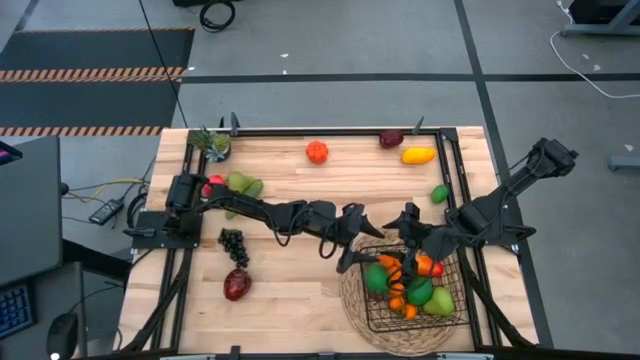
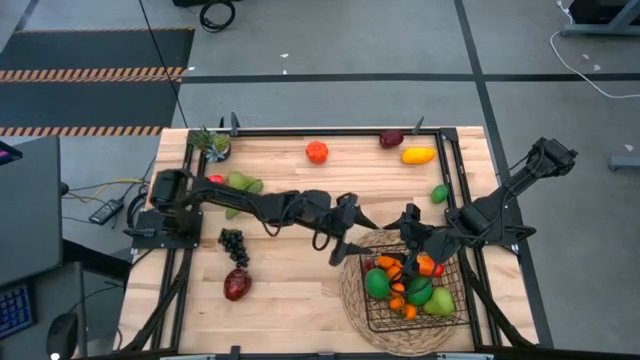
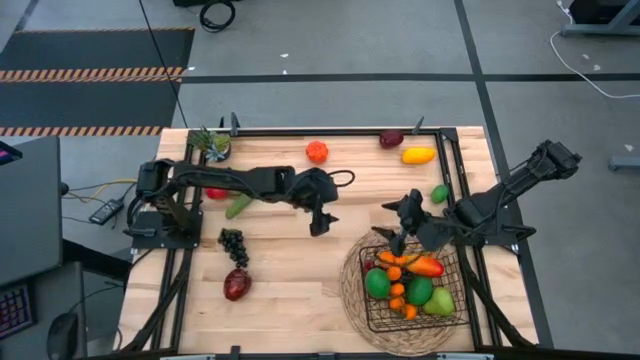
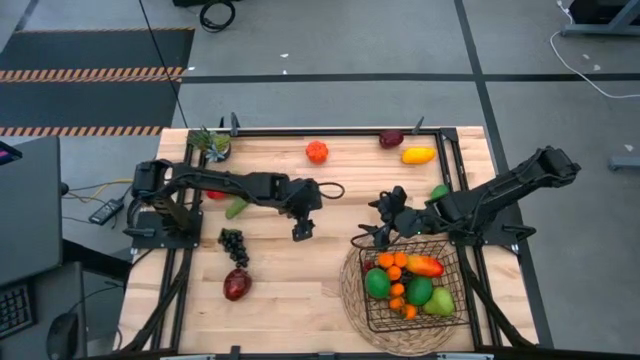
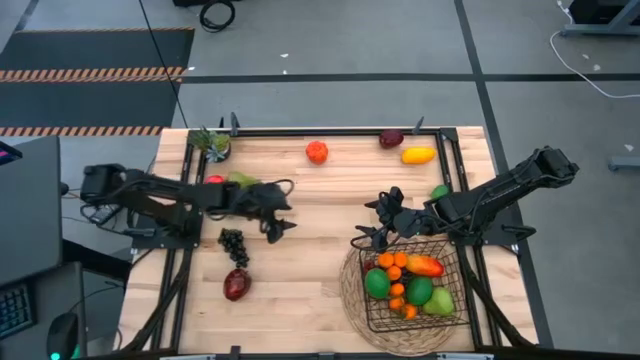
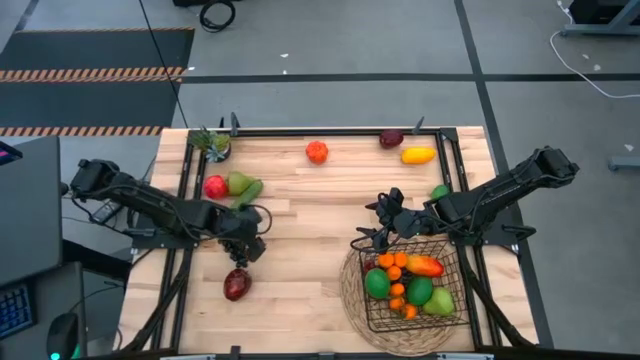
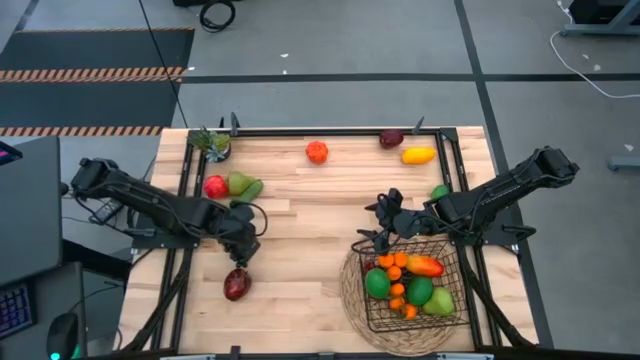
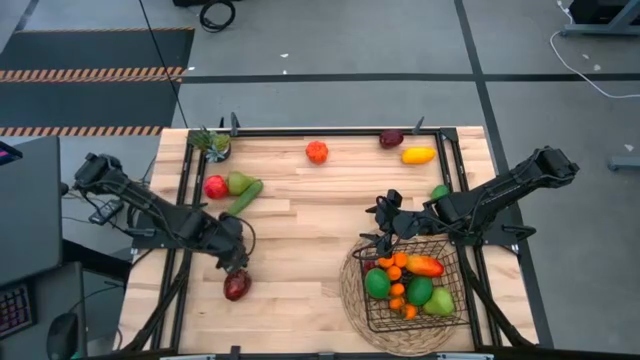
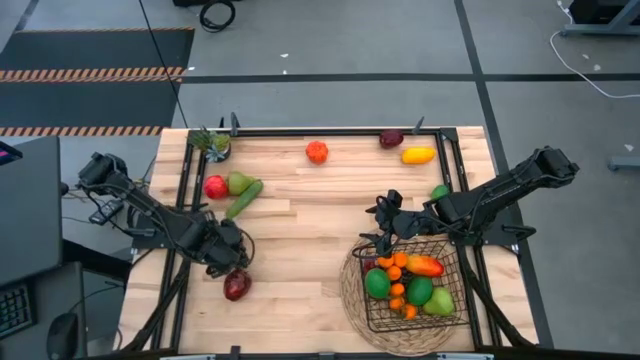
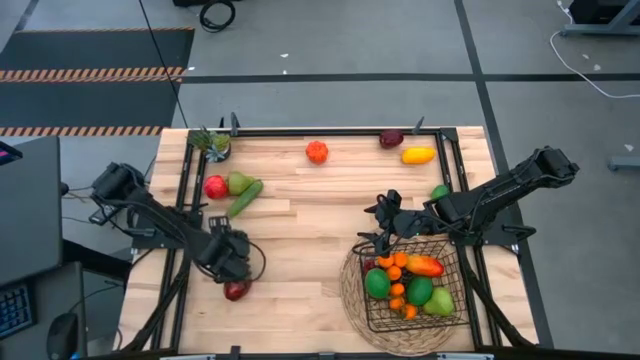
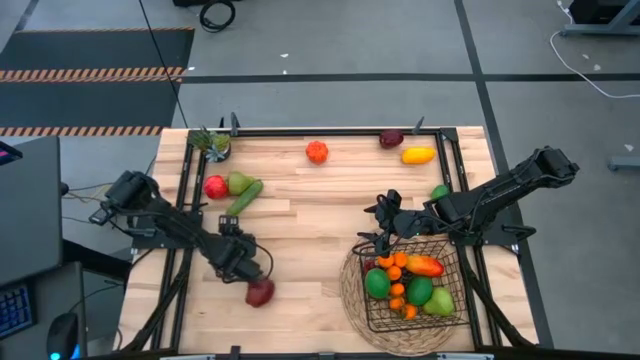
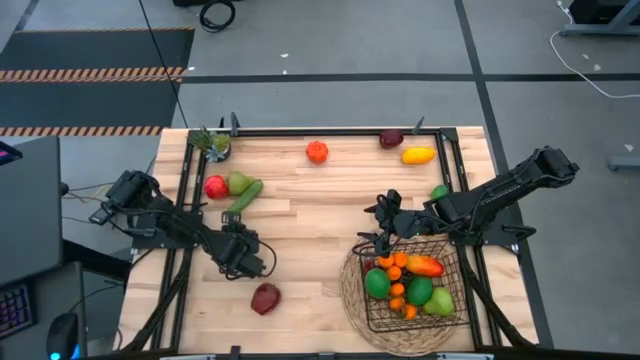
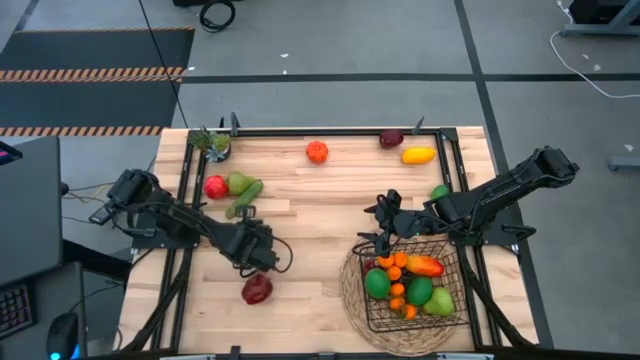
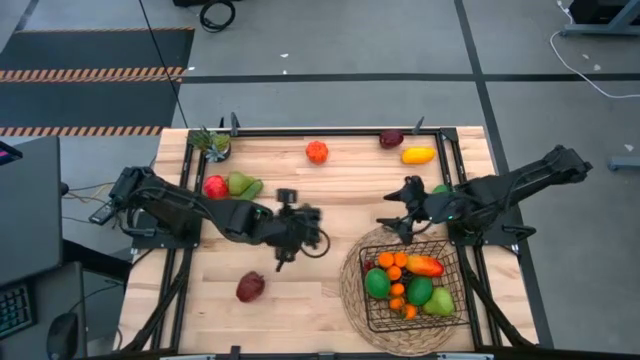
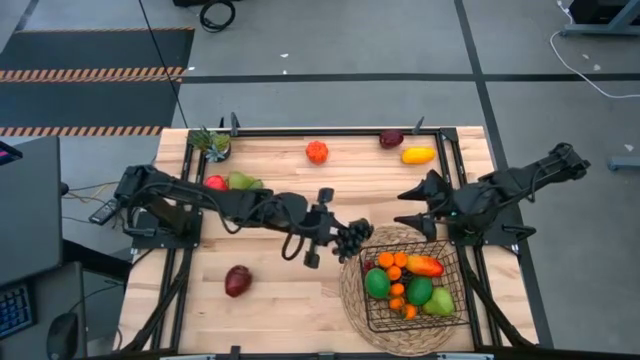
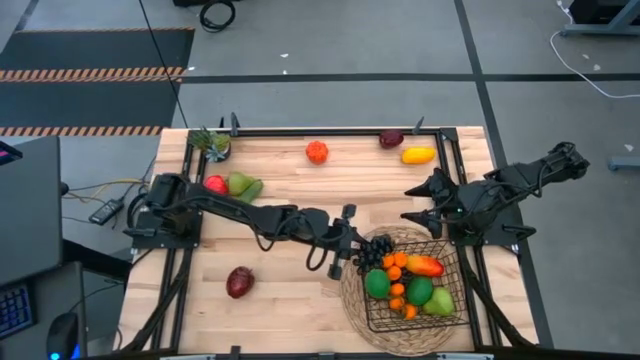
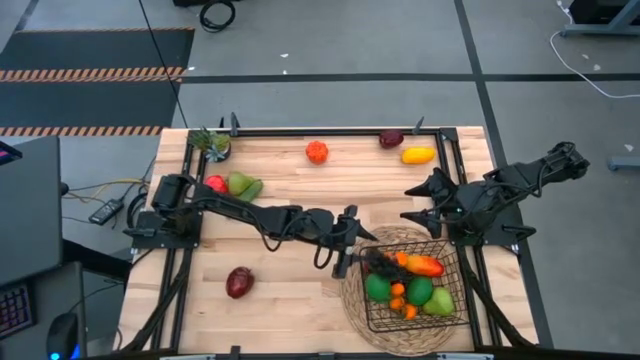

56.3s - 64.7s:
Task: Build produce basket
Put the black grapes into the black wire basket

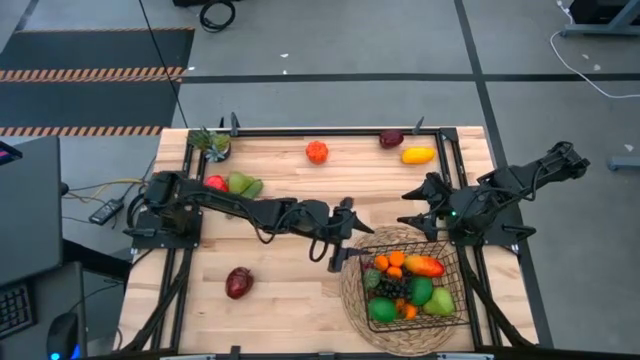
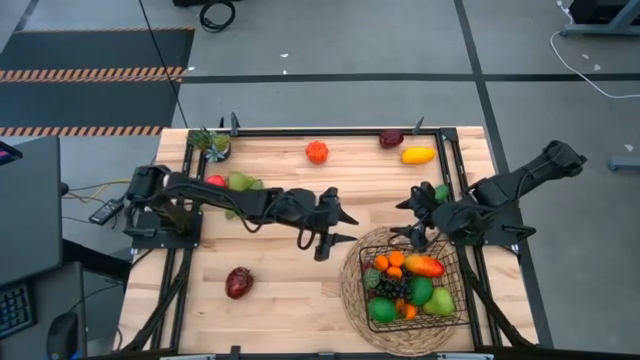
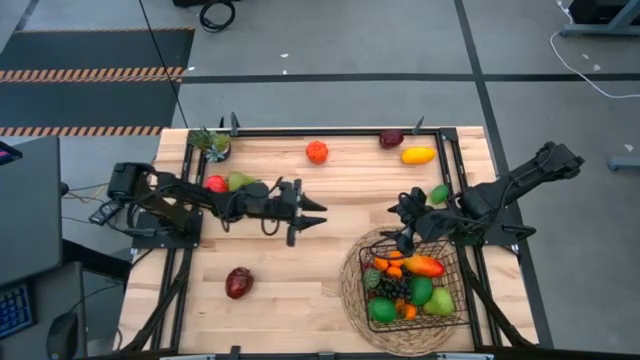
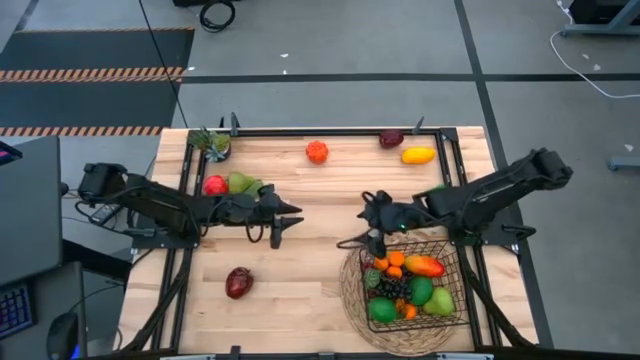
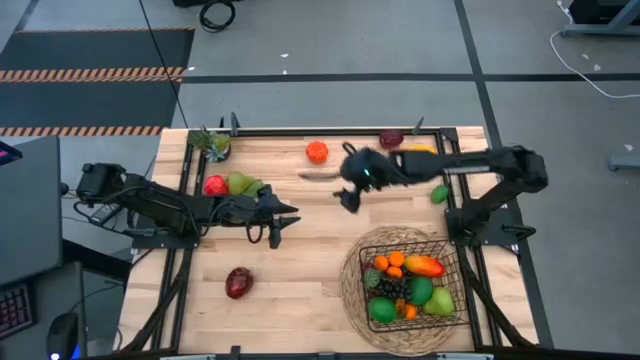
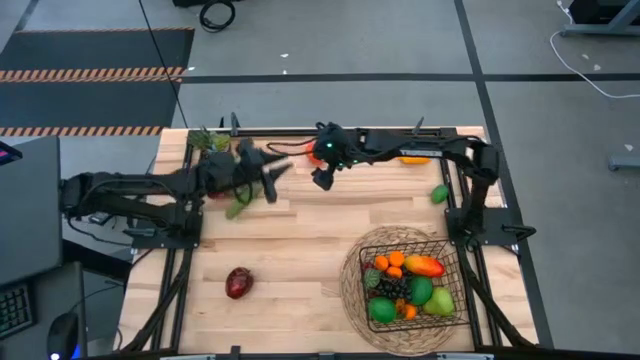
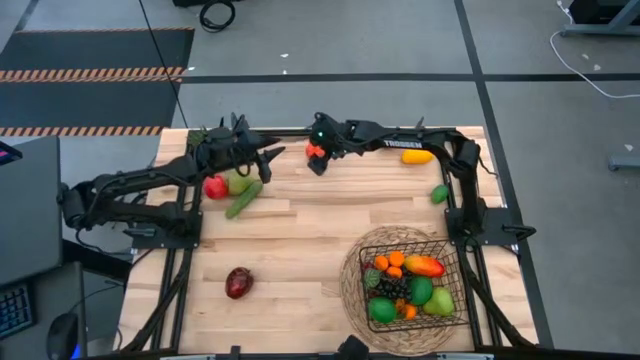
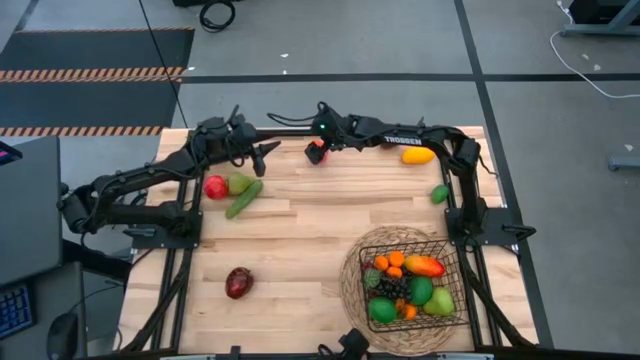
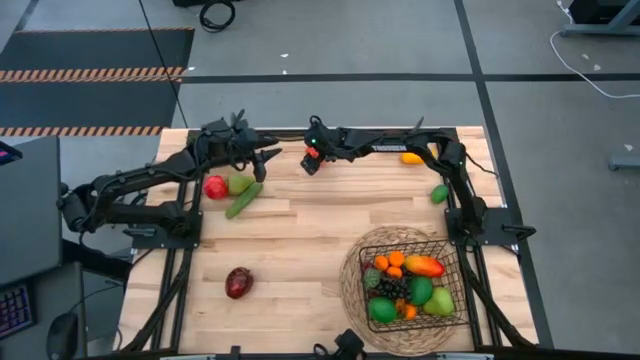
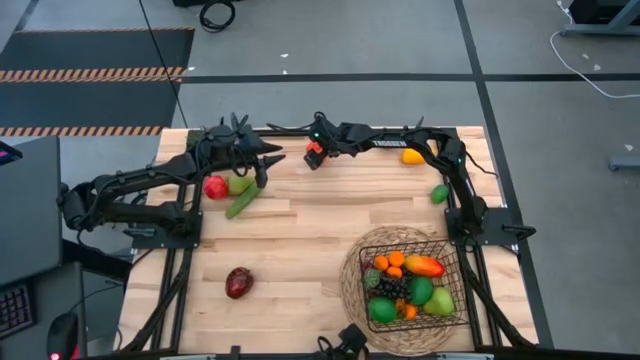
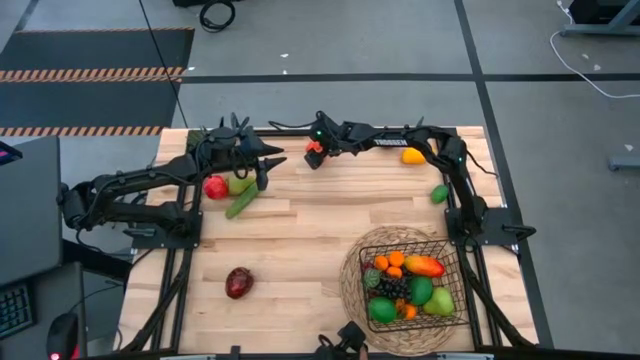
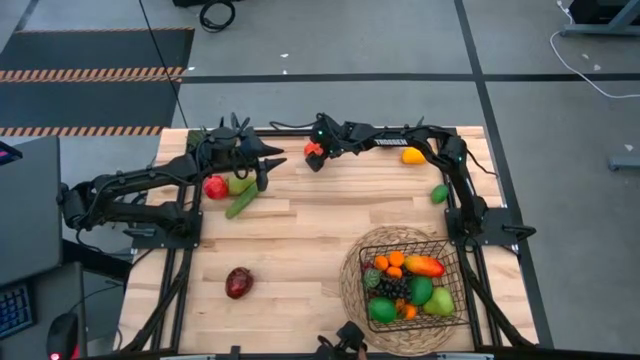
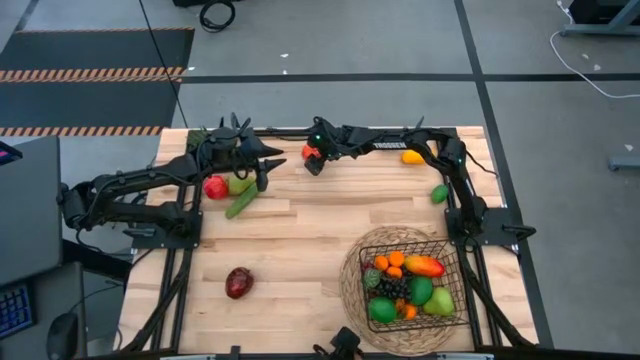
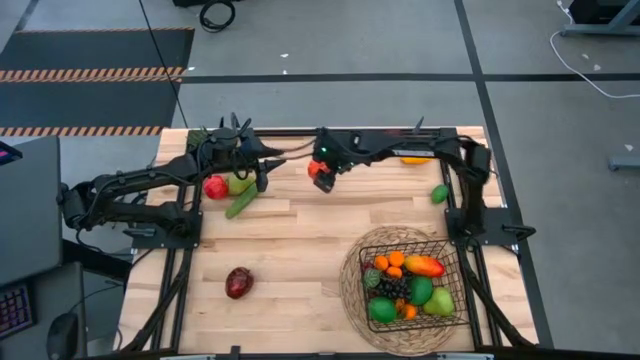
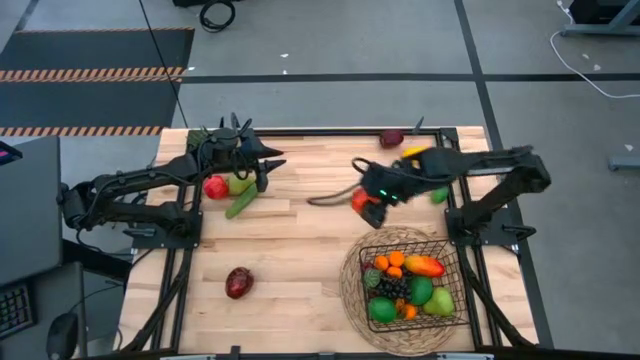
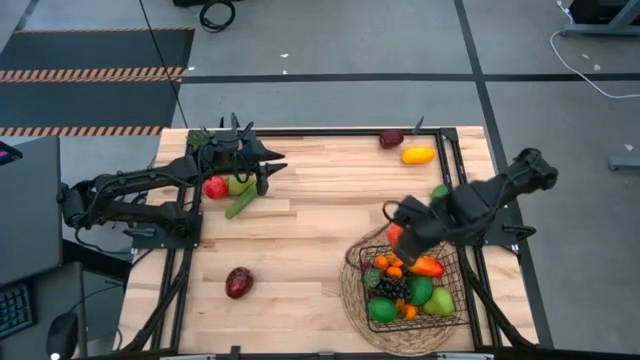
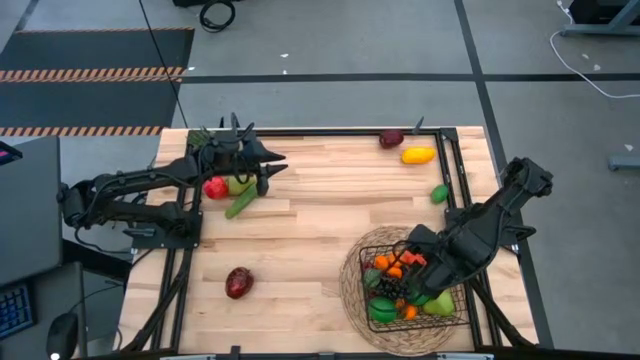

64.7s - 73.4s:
Put the orange pumpkin into the black wire basket

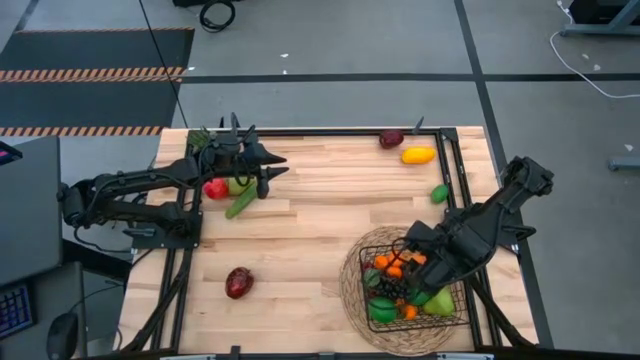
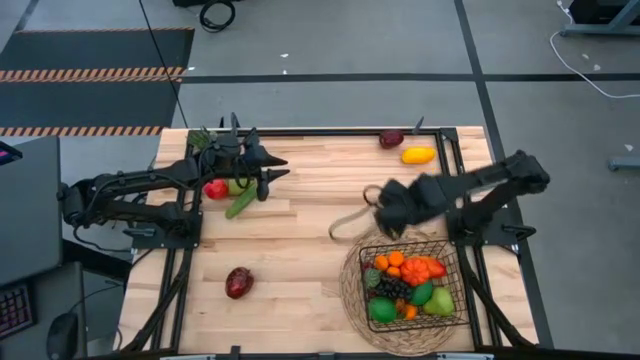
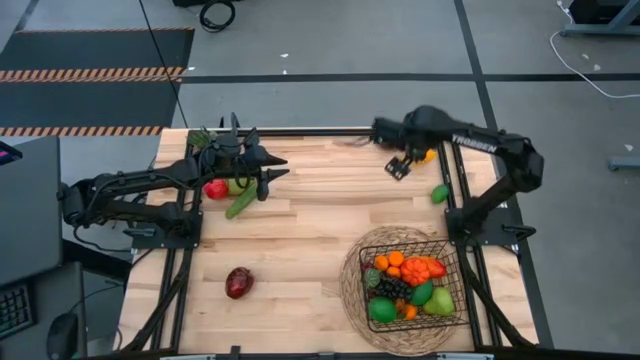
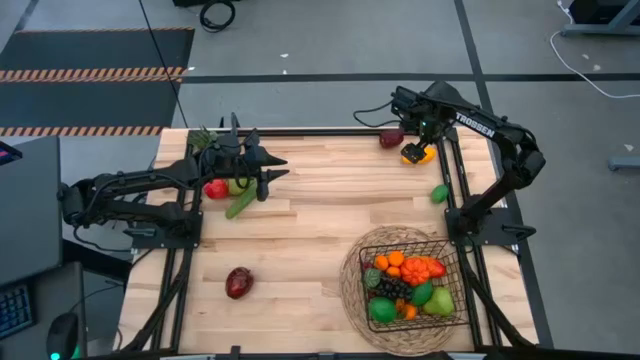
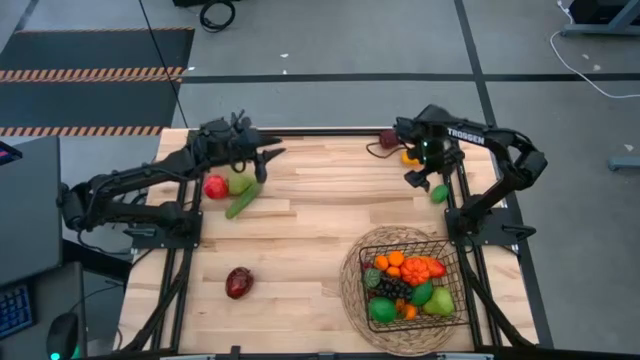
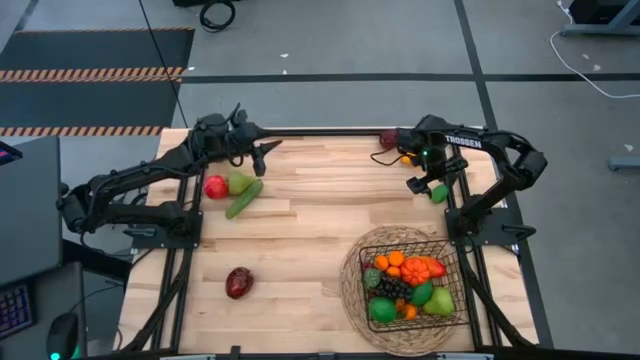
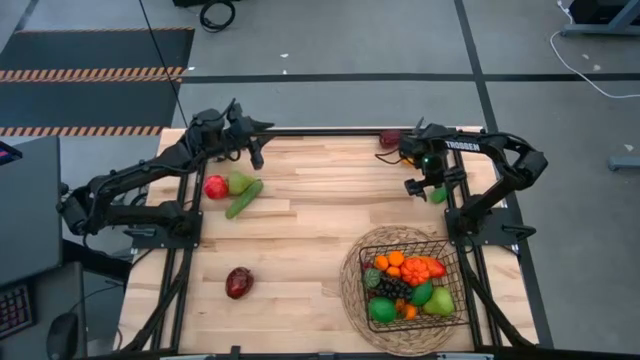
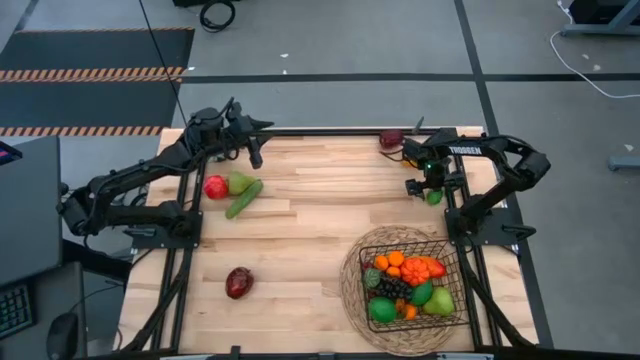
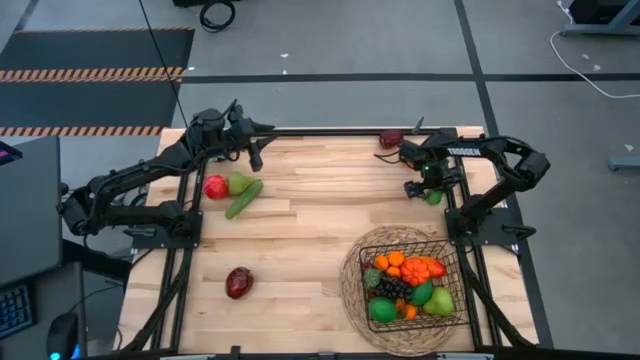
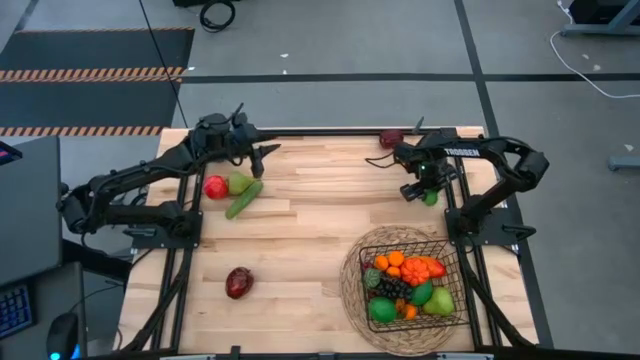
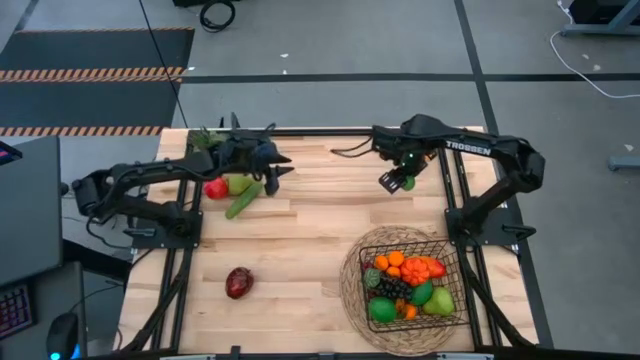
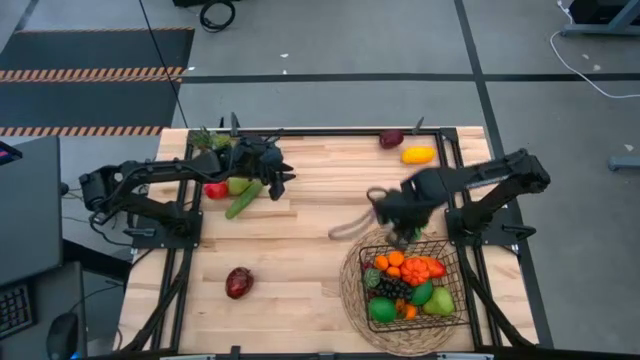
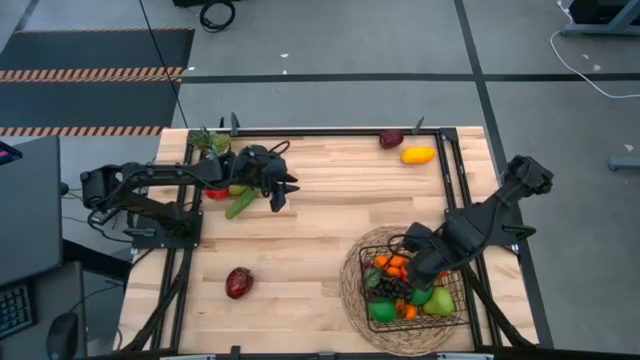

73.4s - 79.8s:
Put the green lime into the black wire basket
